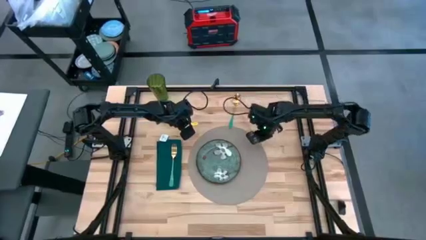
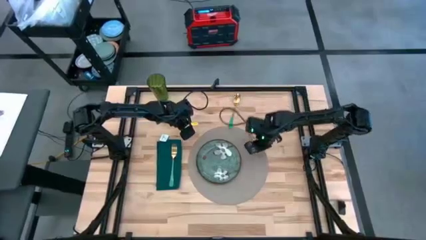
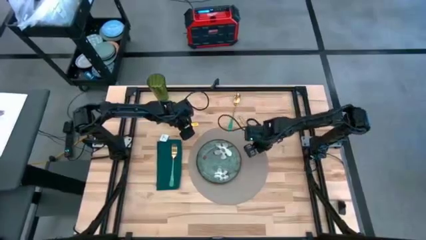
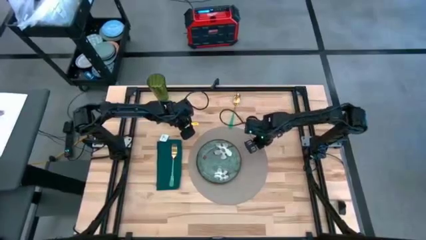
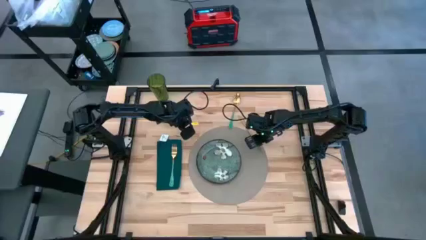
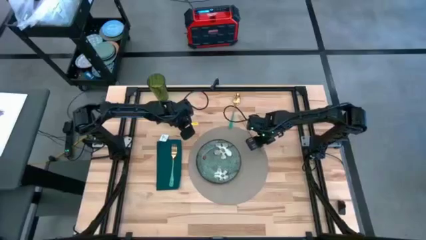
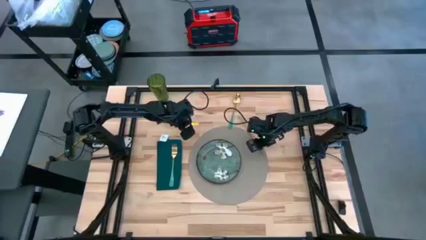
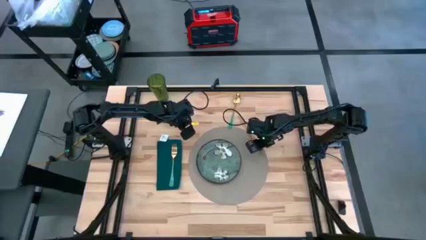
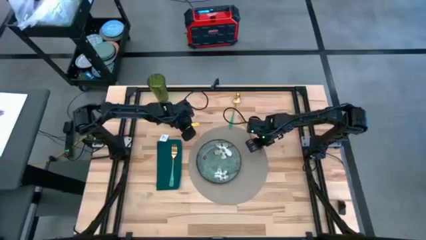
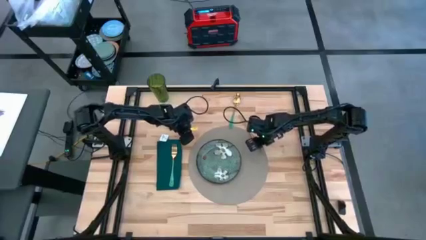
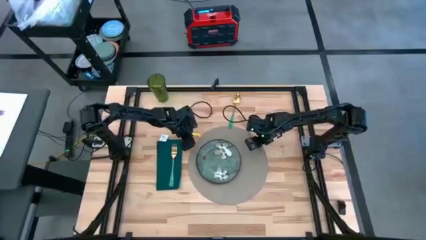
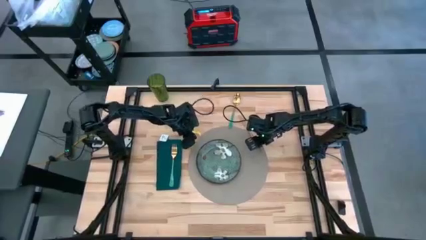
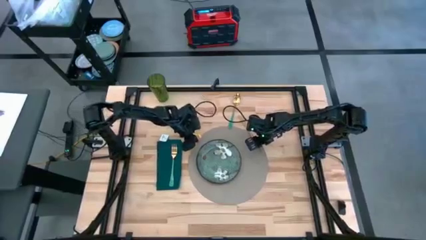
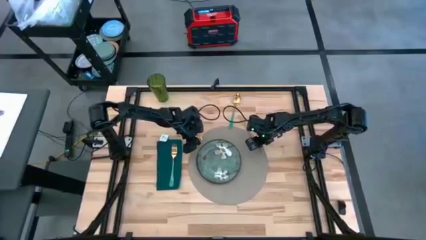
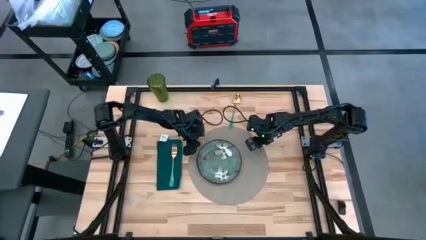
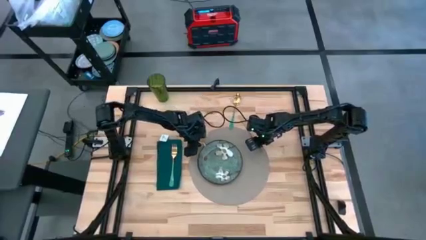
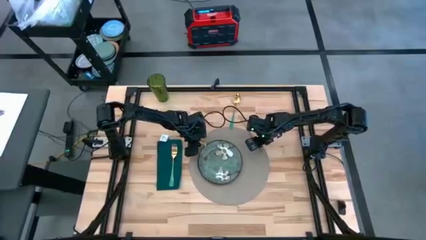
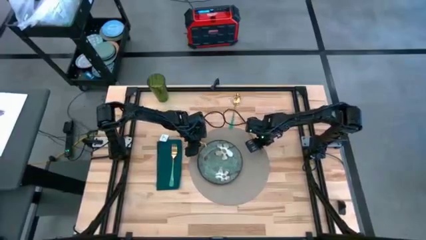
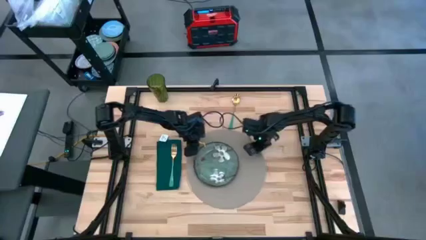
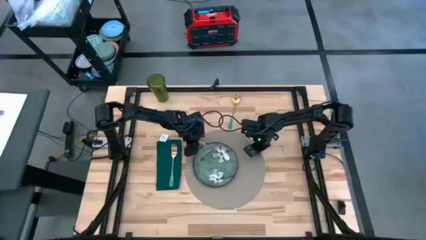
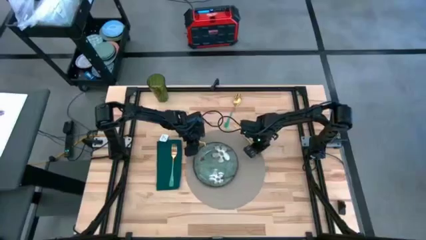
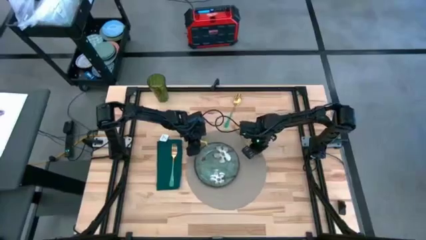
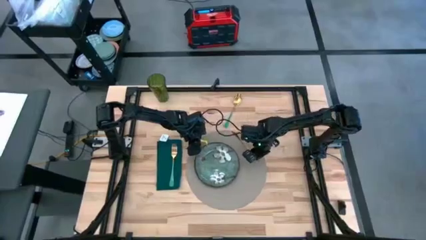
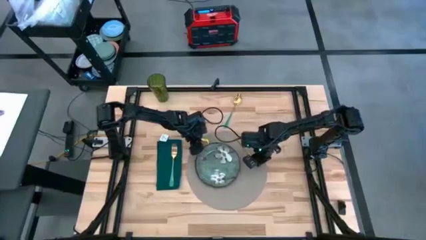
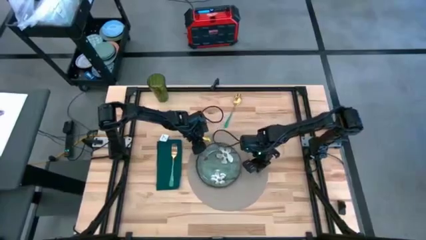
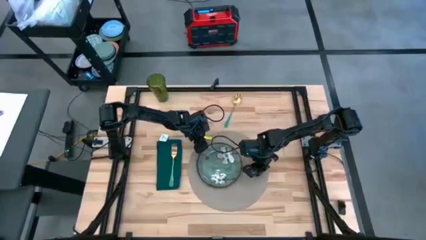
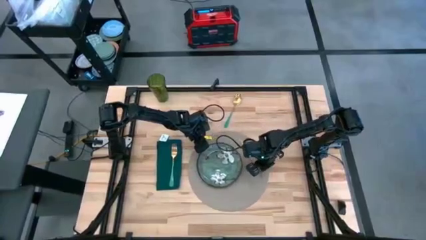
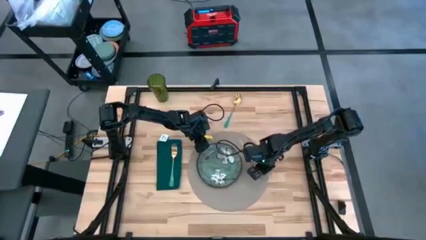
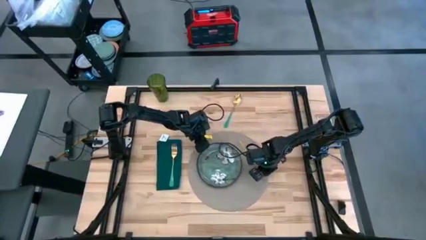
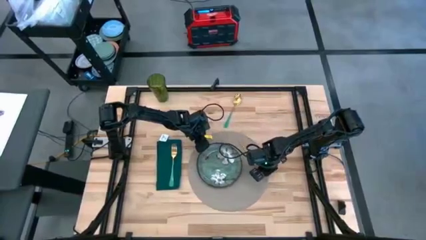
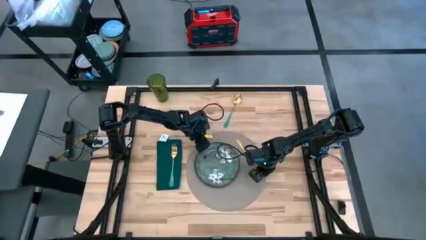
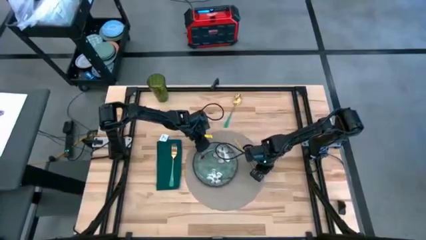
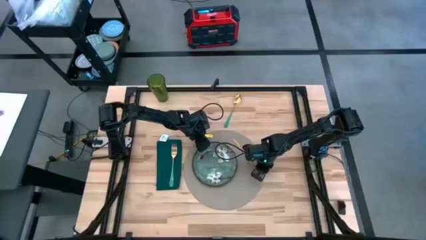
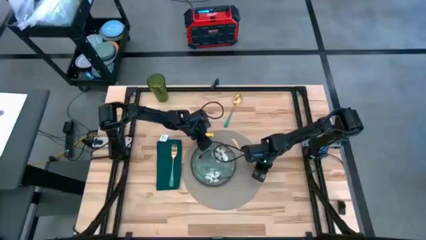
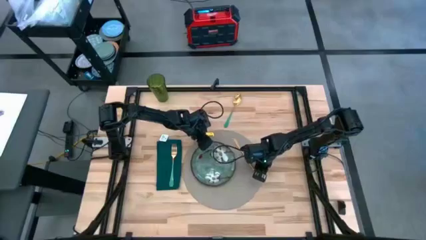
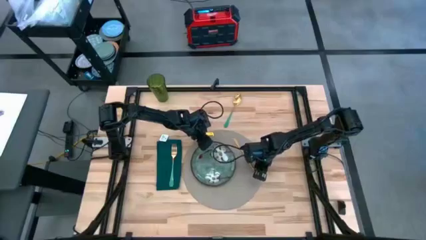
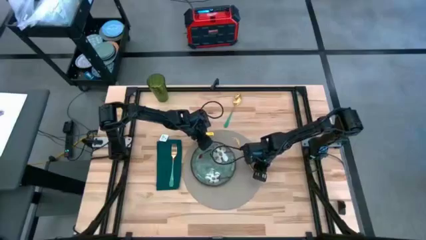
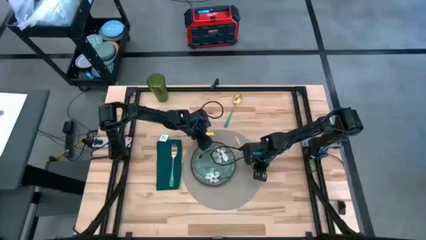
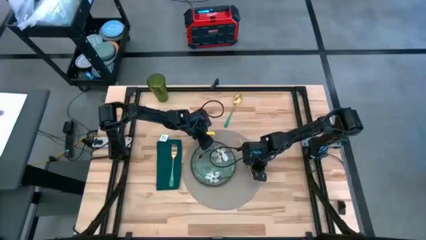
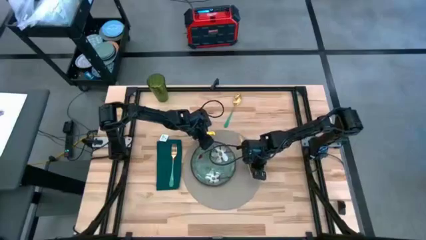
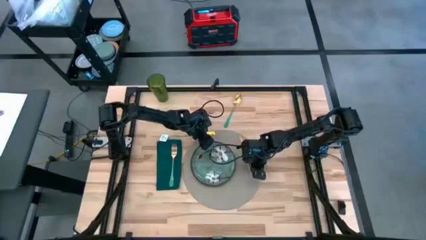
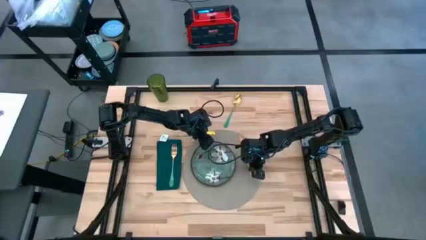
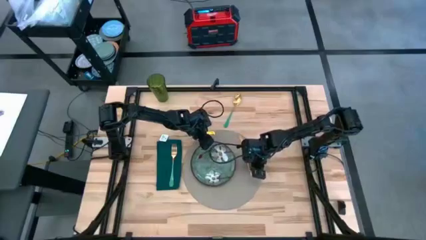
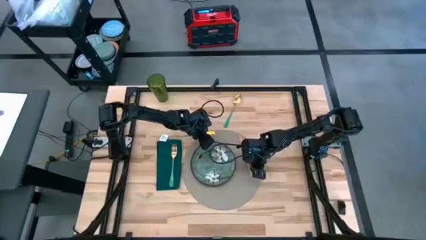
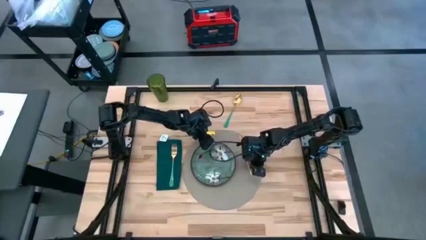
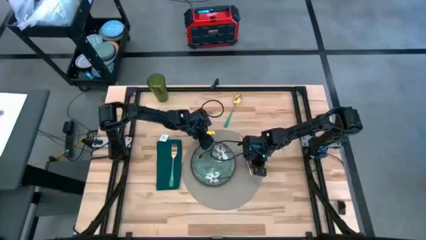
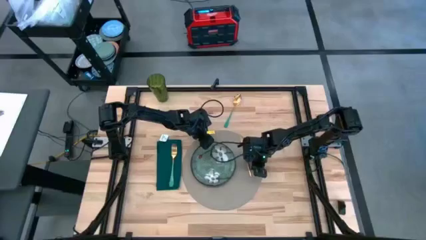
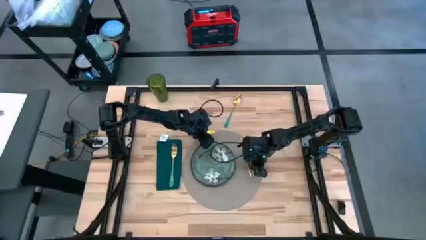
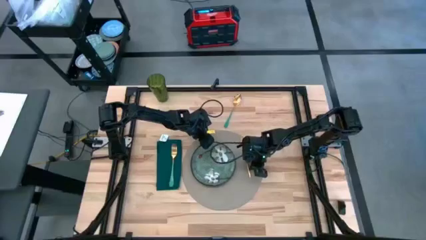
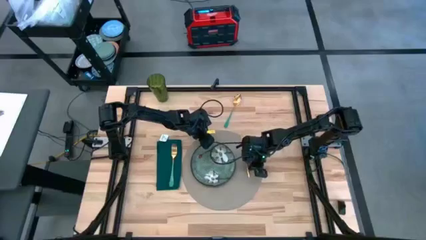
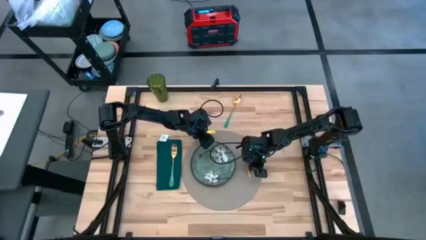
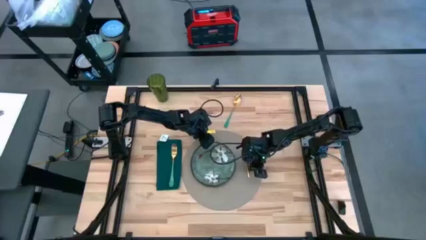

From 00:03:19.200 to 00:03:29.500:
Task: Set table place
Put the golden knife on the gray table mat

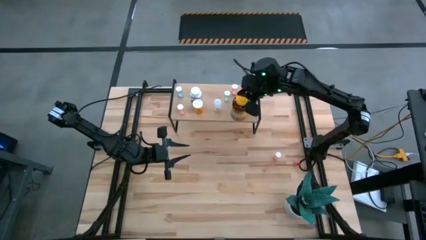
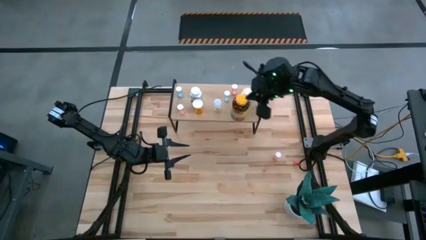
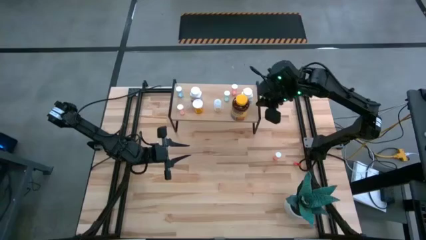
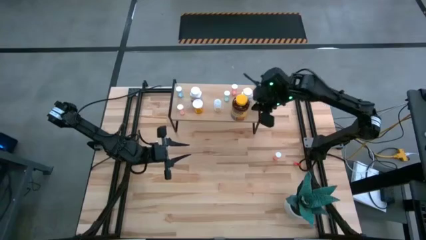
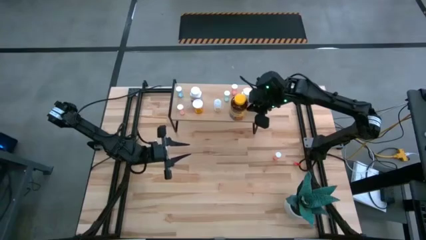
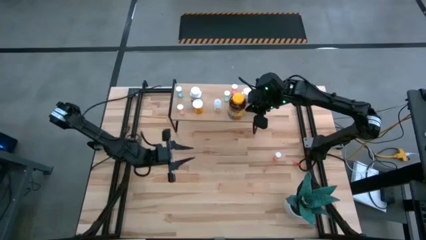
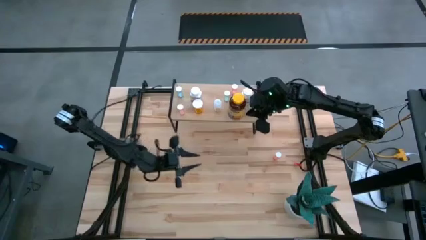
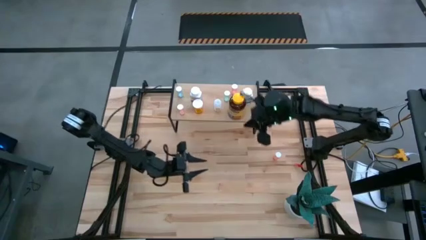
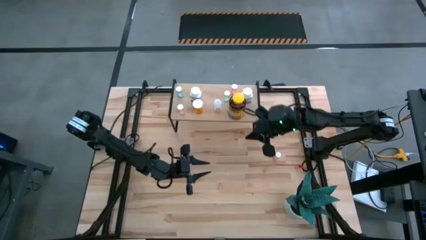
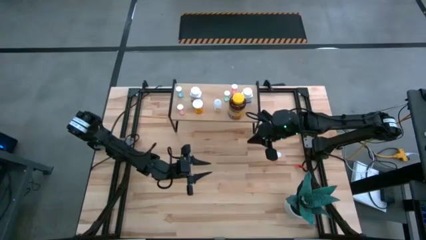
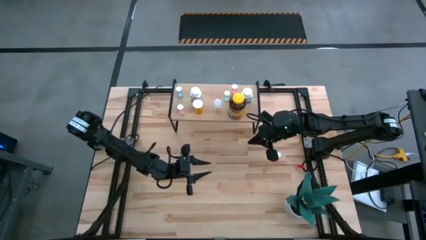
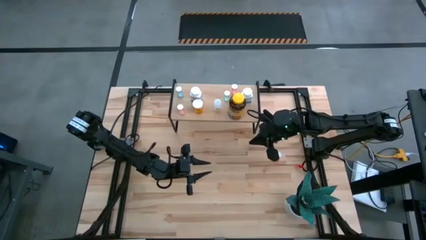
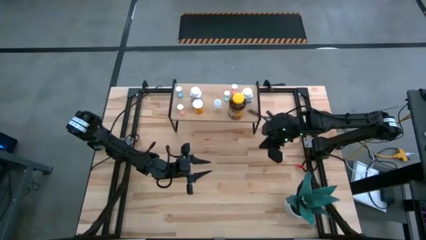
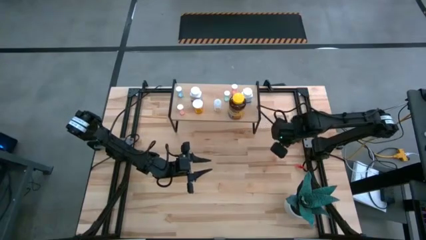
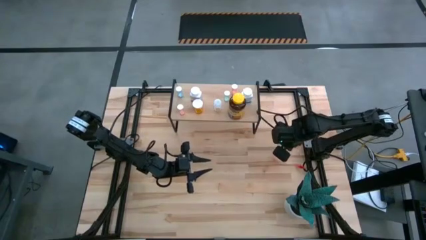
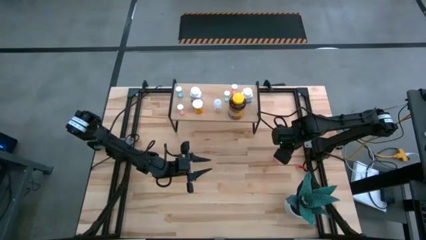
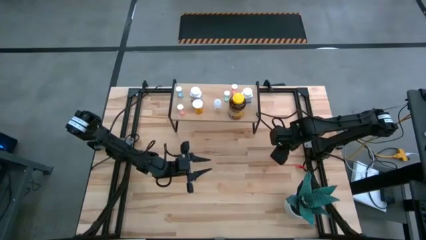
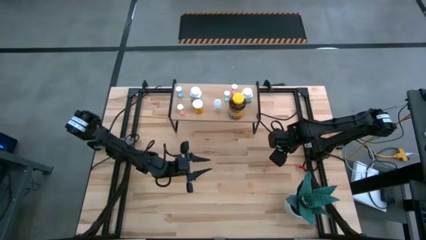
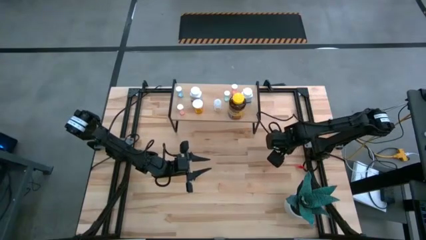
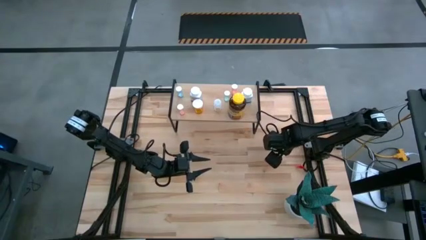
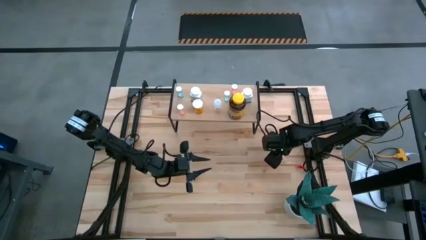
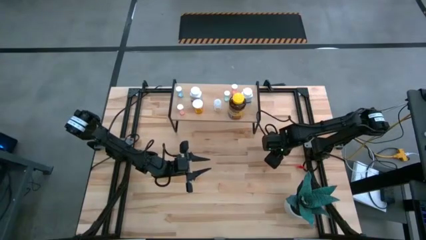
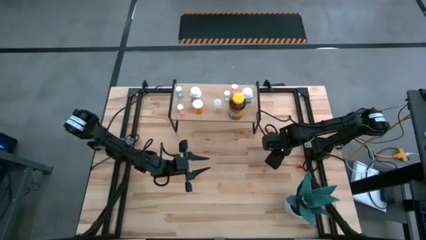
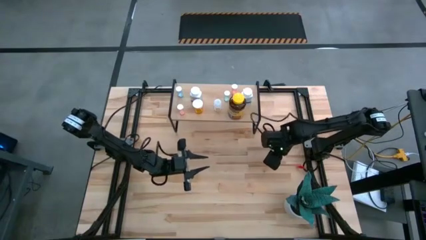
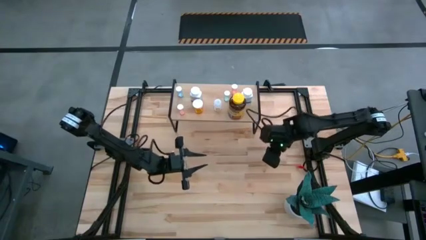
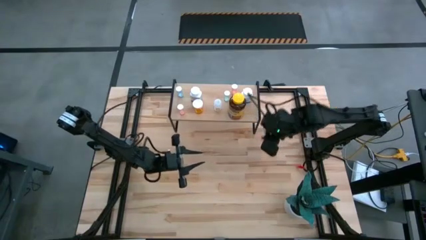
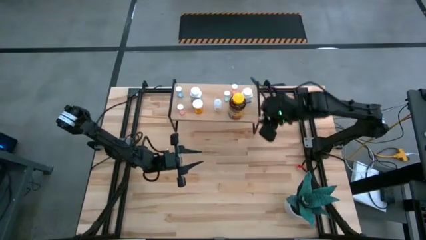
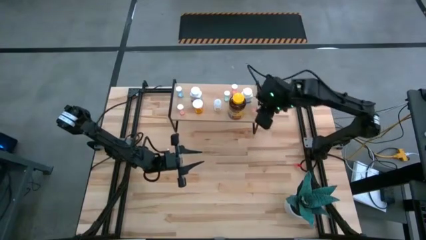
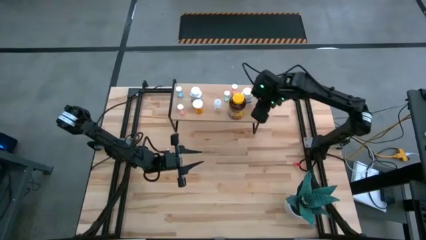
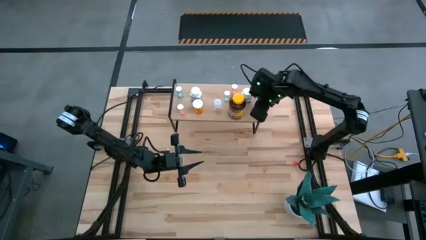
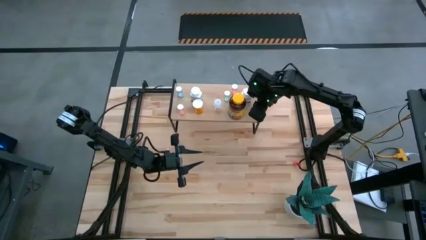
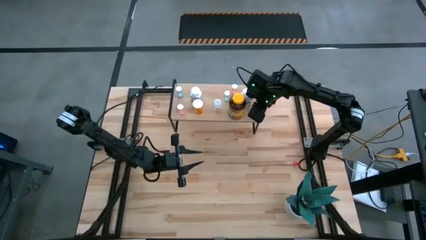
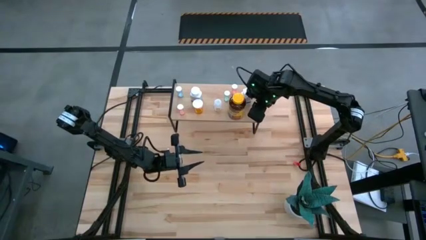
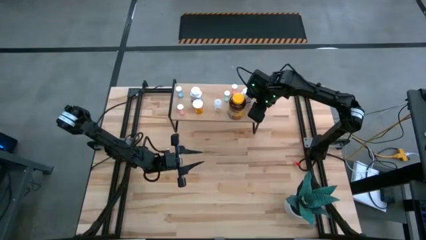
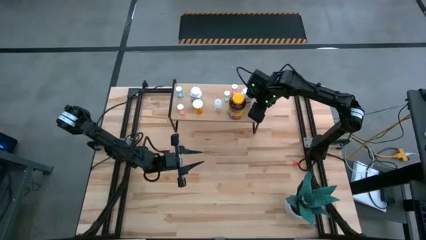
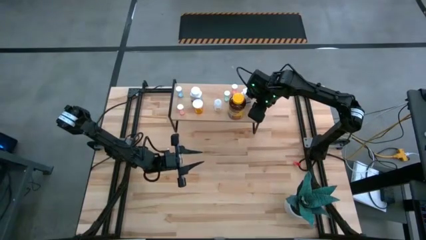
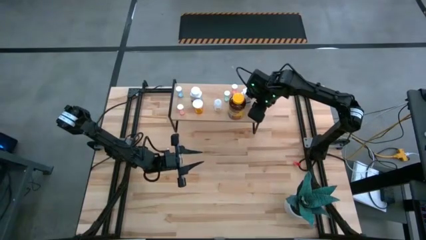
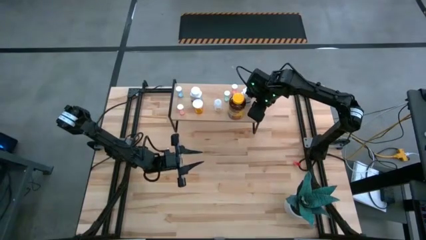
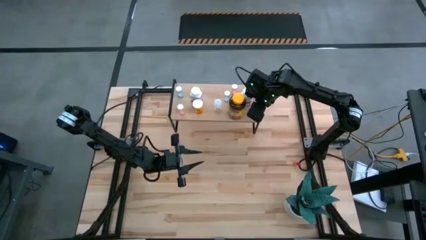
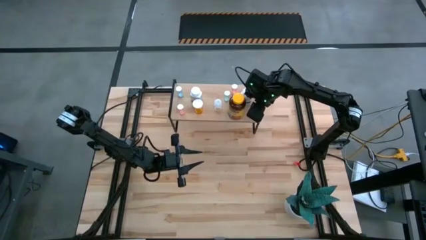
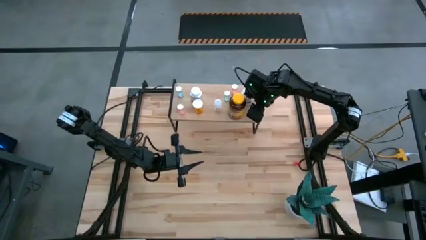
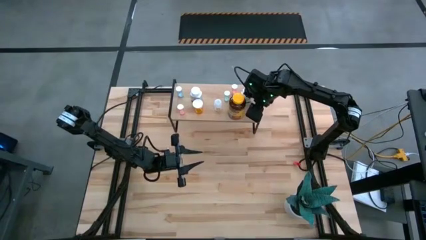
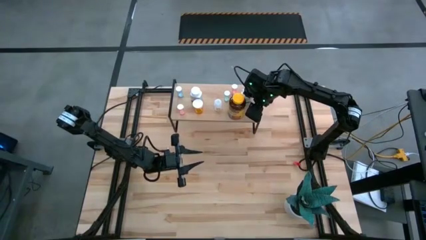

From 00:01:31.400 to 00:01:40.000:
Task: Pick and place medicine bottles onto shelf by color
Put the red pill bottle on the shelf
